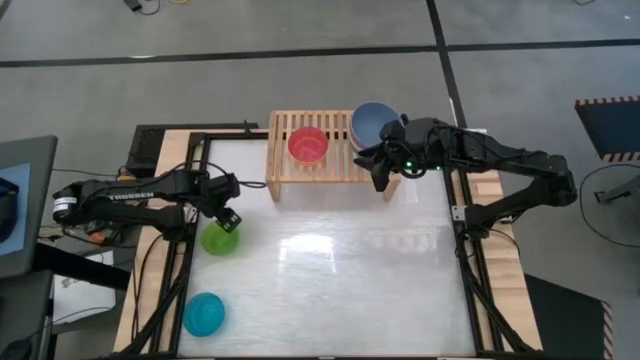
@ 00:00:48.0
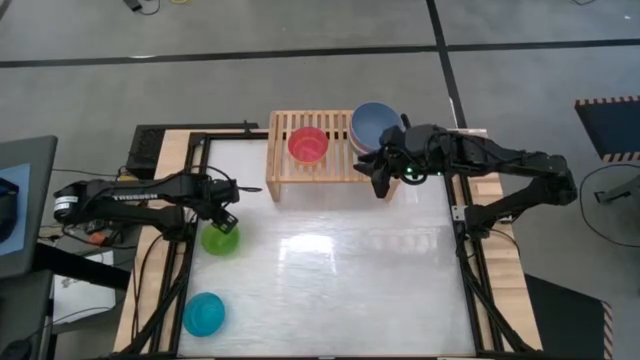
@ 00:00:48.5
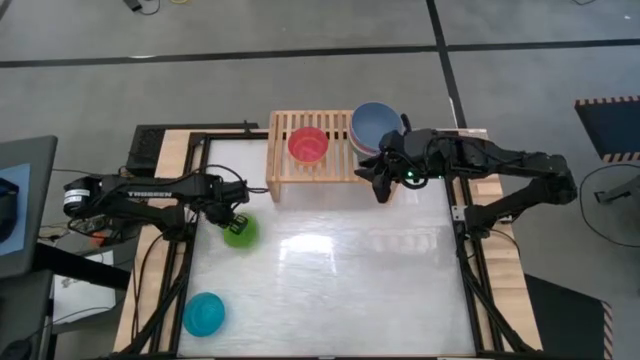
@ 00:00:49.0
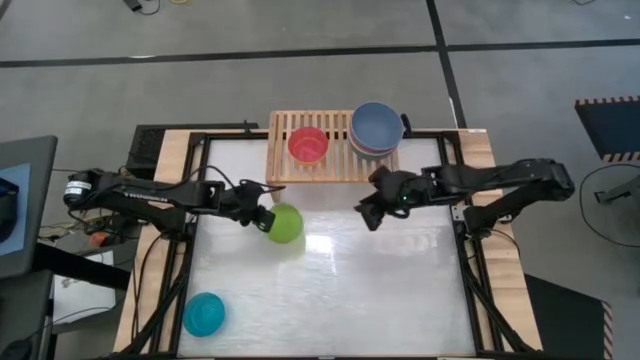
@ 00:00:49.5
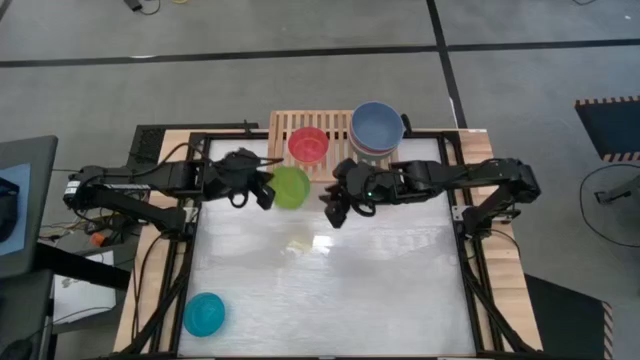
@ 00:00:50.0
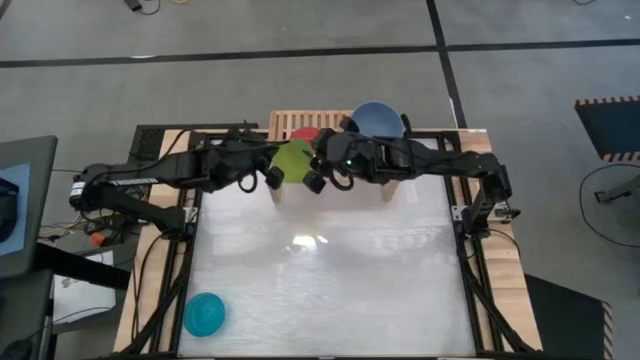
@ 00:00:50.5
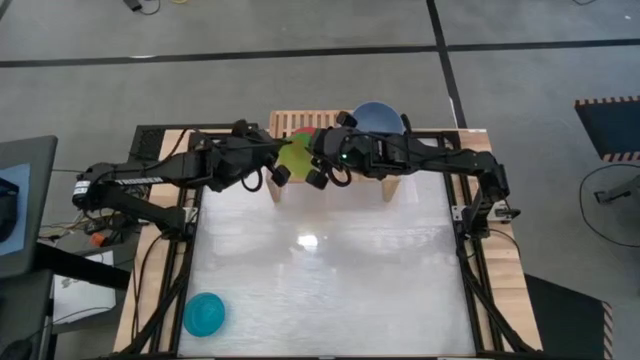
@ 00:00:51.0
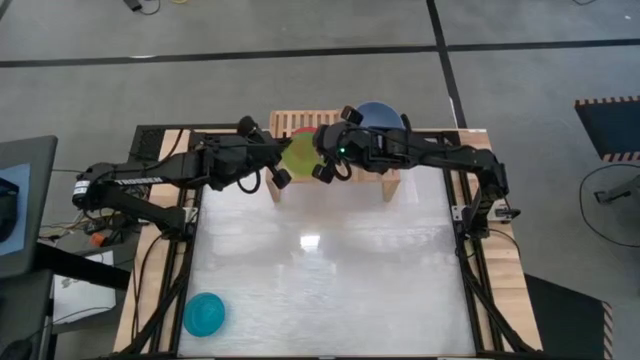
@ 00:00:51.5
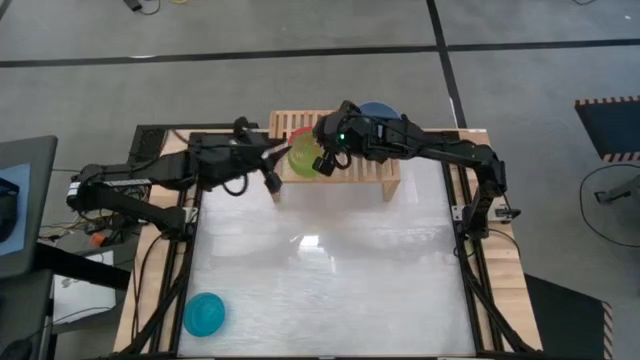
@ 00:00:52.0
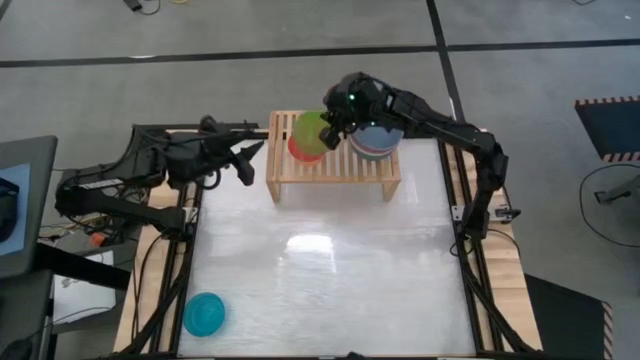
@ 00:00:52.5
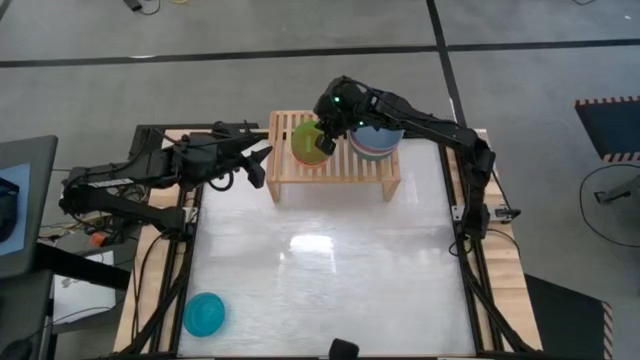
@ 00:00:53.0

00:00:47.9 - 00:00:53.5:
Task: Place and stack bowls onto a shelf
Stack the green bowl on top of the pink bowl on the shelf

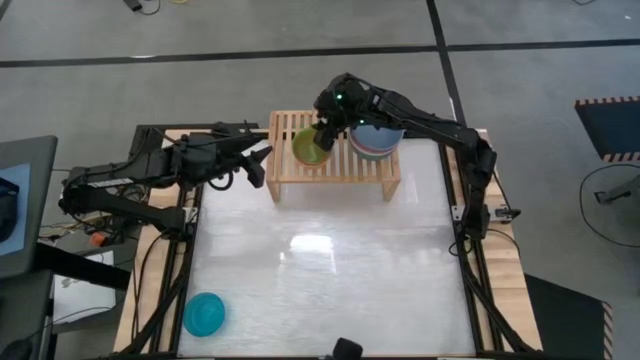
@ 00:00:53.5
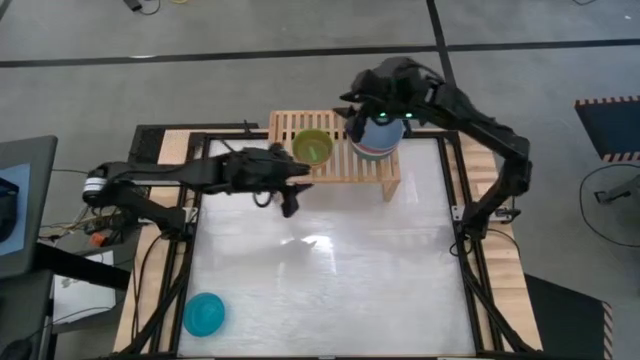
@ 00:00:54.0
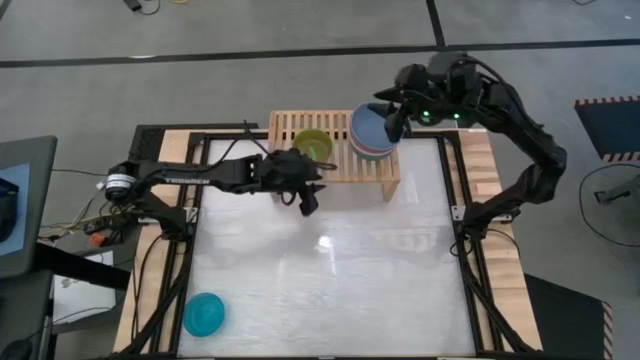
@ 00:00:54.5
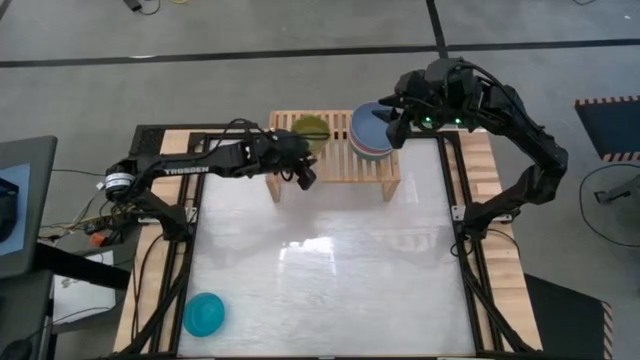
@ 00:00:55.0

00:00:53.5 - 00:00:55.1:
Adjust the stacked bowls

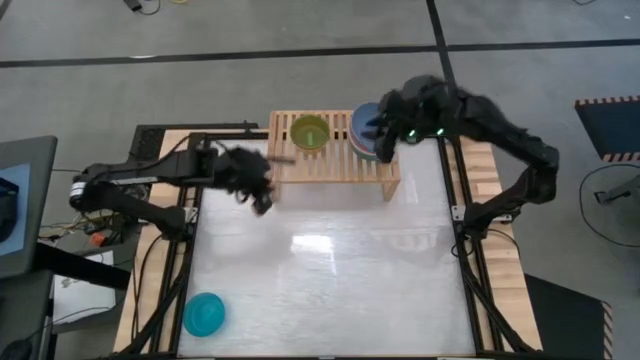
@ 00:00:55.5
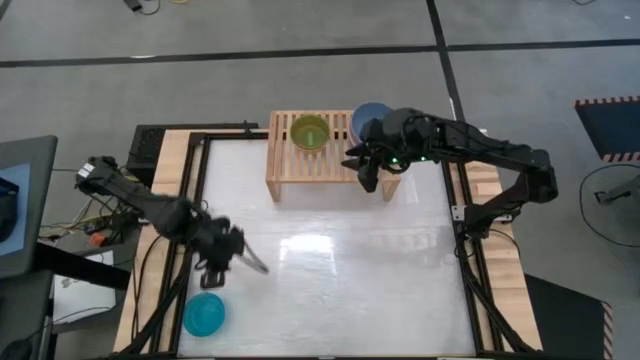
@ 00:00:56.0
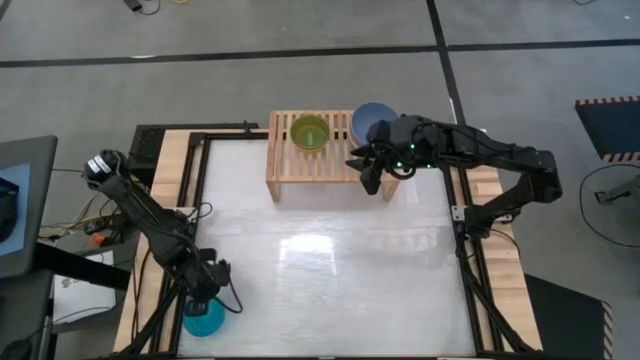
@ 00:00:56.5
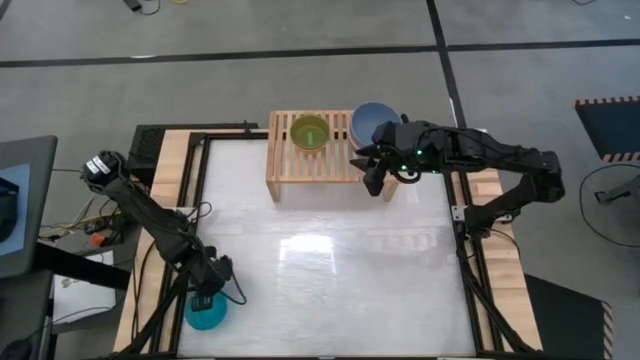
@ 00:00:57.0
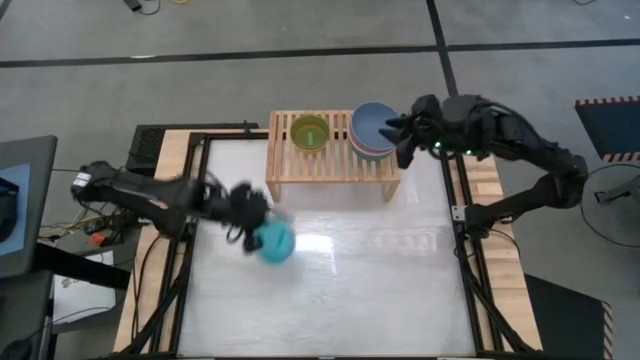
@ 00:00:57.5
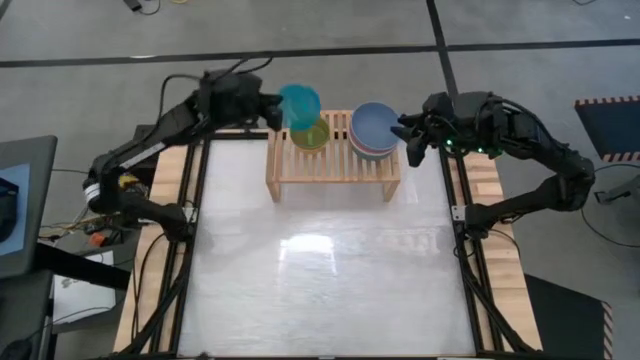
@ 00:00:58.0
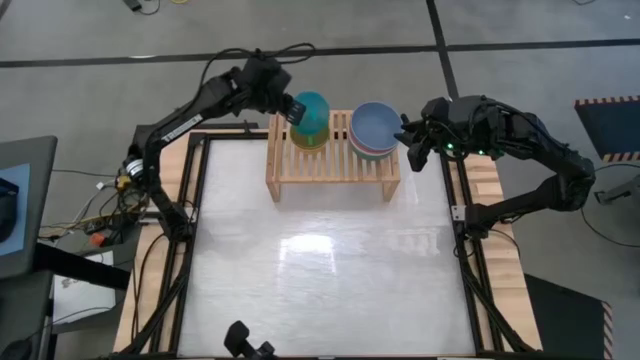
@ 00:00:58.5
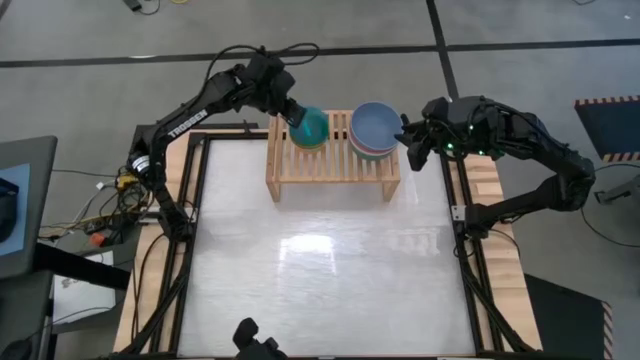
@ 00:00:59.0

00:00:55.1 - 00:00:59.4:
Stack the blue bowl on top of the green bowl on the shelf

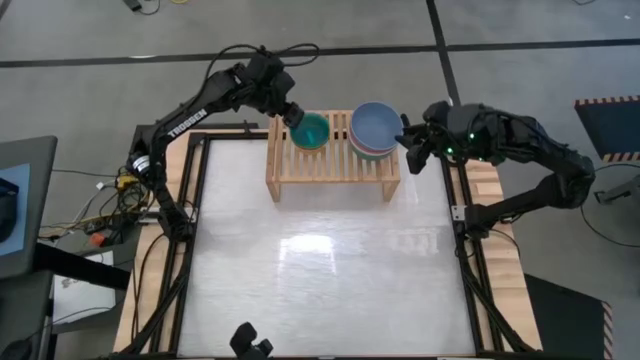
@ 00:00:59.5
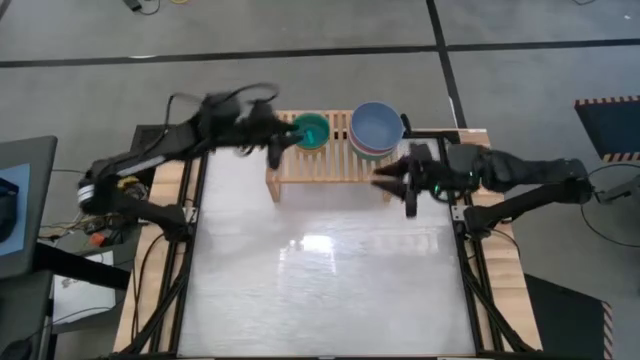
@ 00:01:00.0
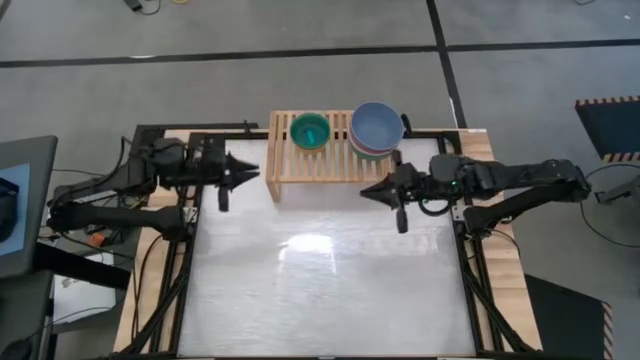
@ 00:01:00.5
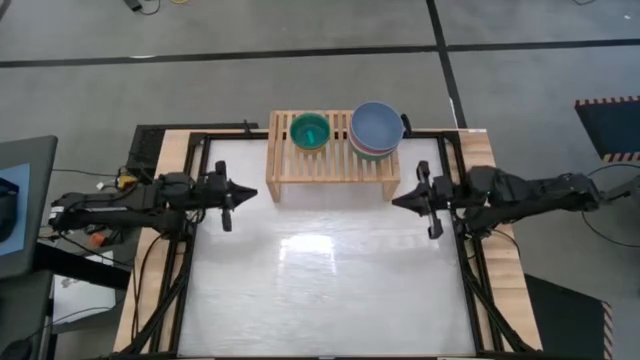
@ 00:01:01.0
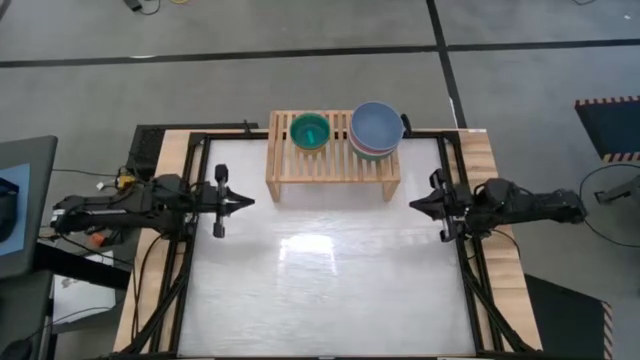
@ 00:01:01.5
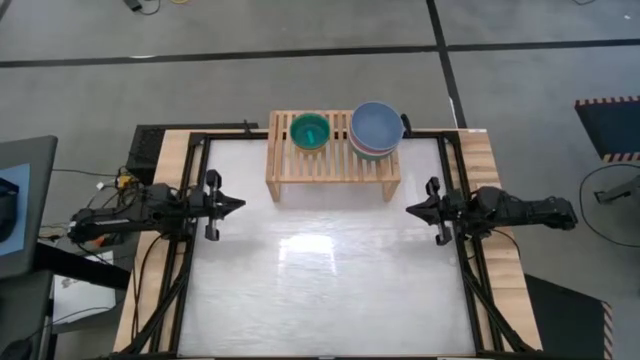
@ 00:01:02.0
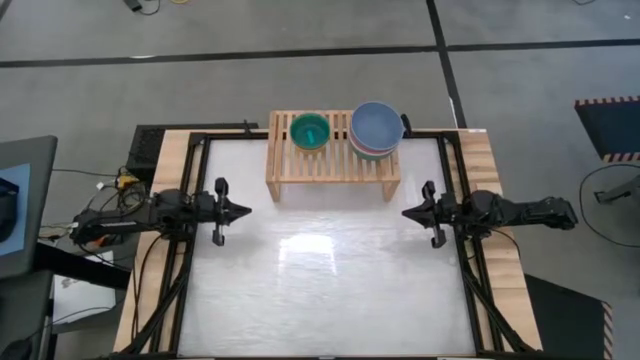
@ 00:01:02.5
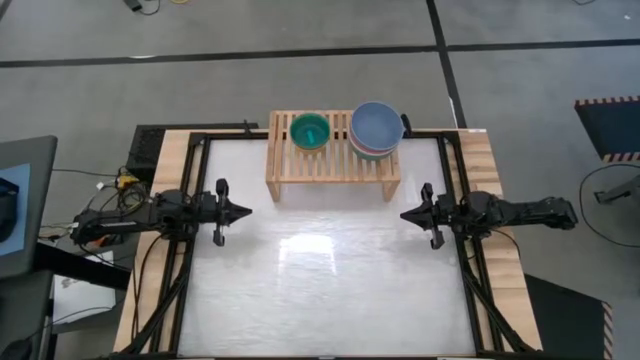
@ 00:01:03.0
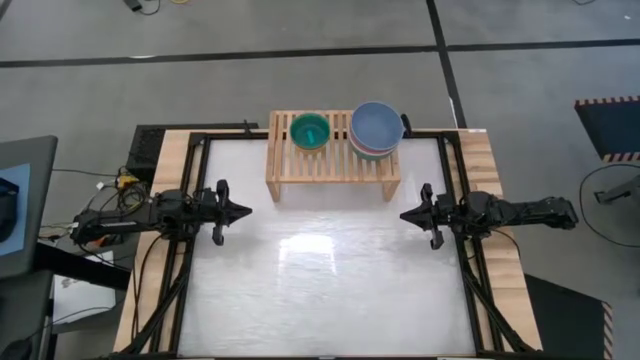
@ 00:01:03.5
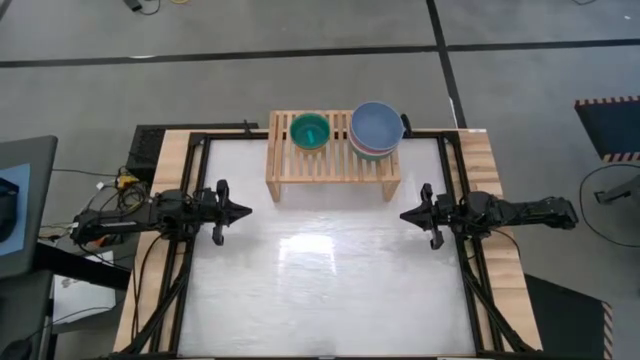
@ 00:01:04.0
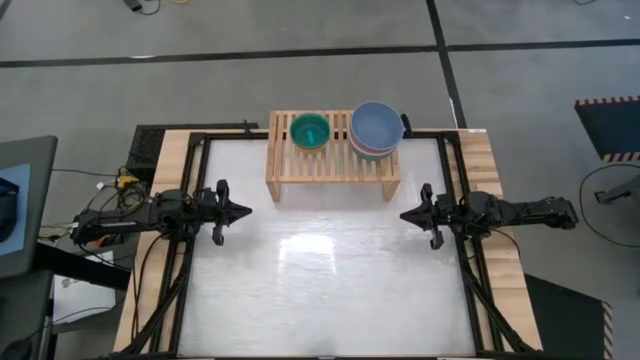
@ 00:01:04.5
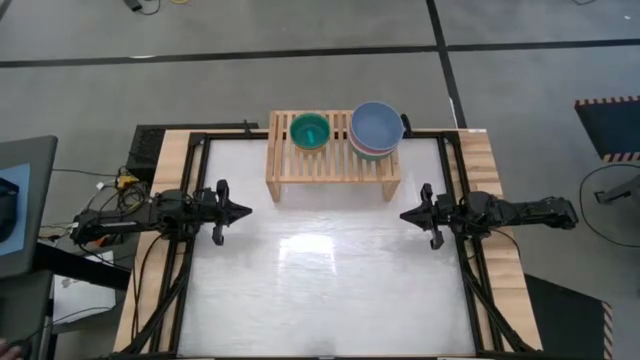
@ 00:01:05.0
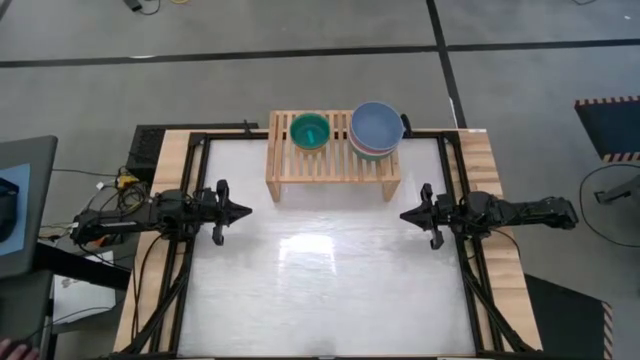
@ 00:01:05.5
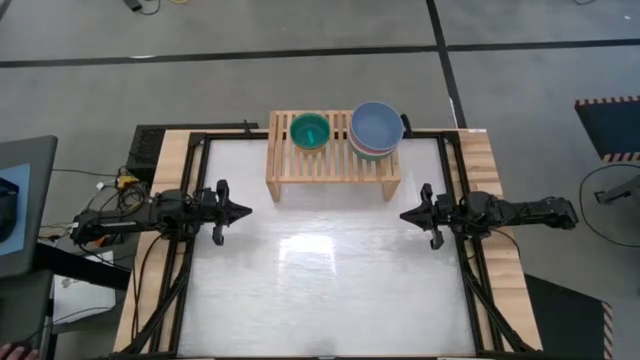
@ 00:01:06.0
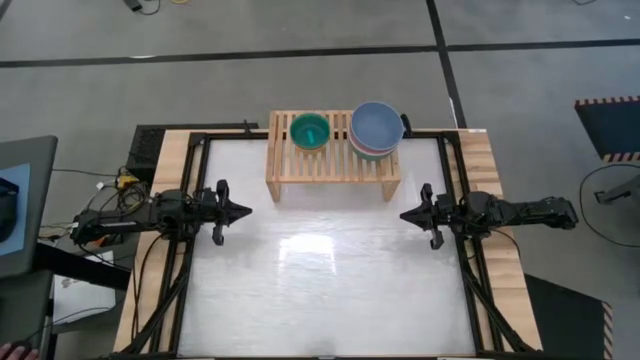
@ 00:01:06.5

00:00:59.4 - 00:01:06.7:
Return to Home Position

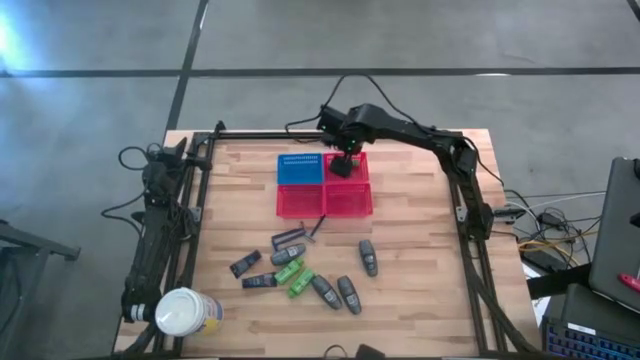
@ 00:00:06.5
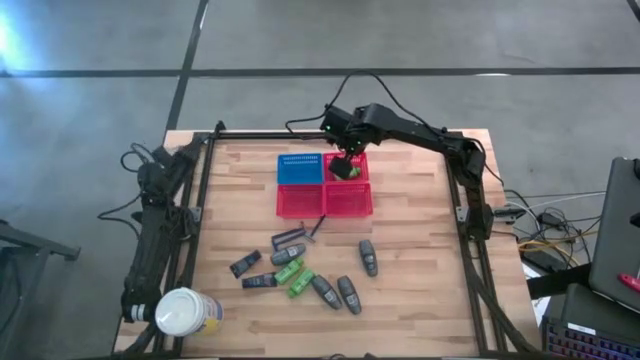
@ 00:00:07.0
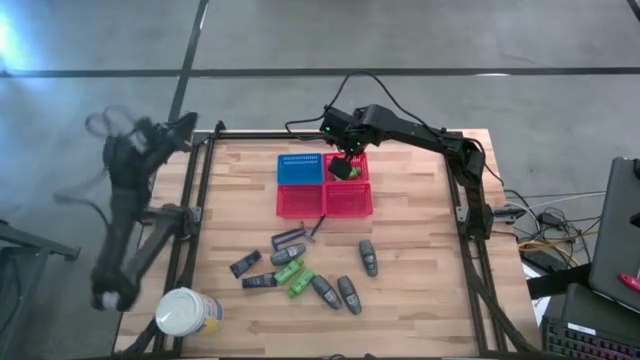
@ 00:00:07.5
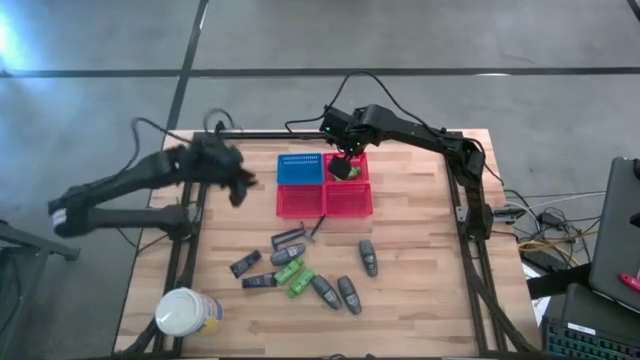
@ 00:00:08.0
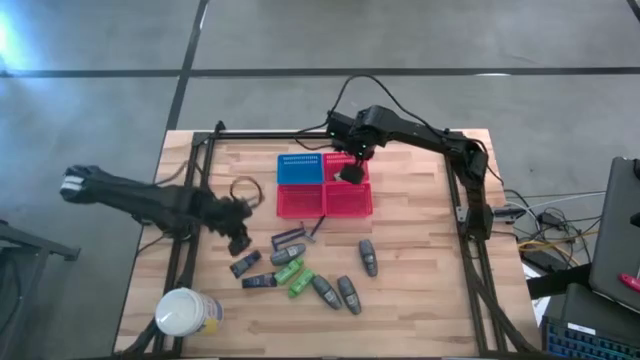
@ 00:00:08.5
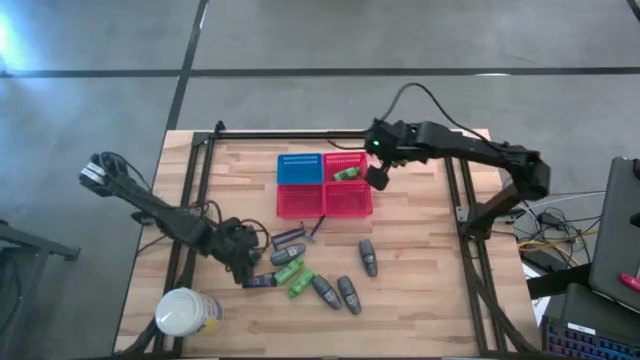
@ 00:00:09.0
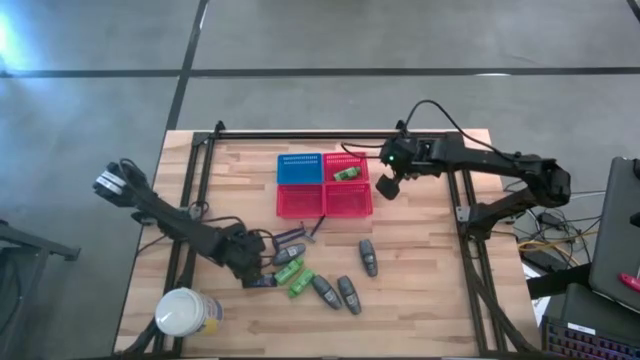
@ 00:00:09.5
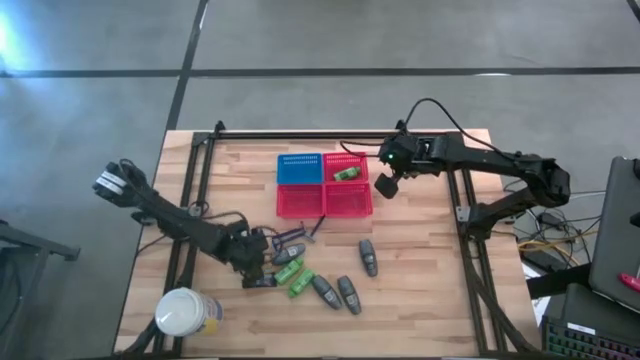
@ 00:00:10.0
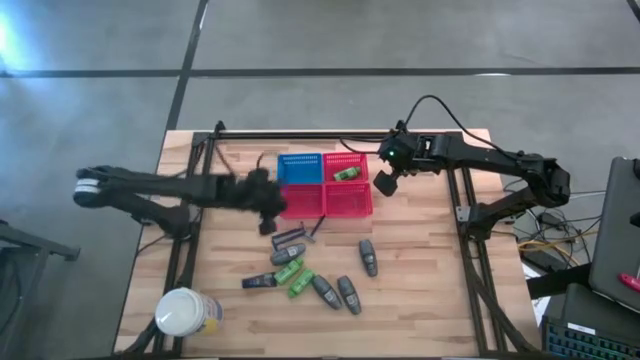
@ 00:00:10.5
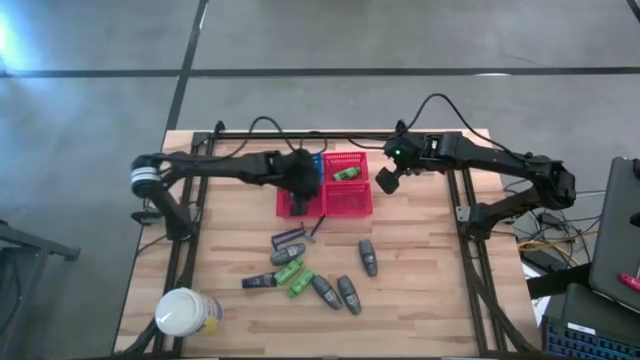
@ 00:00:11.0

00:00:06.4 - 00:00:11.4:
Task: Pick & Place Travel size toiletries
Put the shave cream into the bottom left red bin
